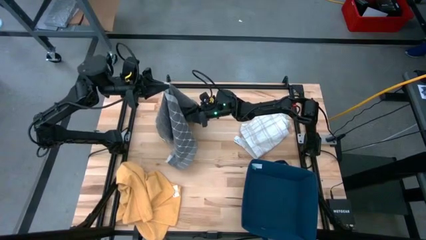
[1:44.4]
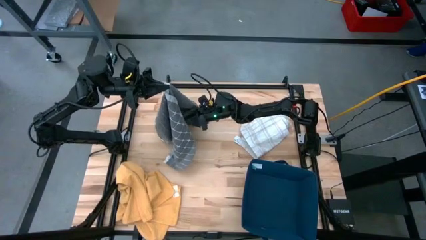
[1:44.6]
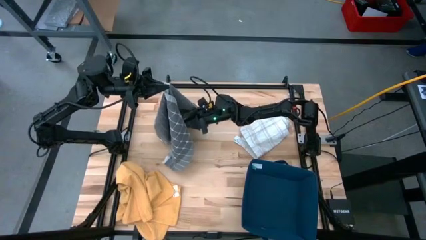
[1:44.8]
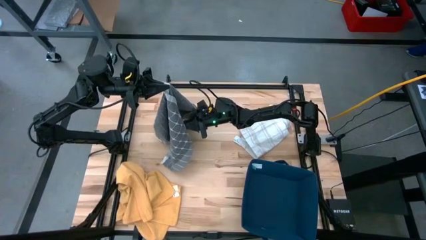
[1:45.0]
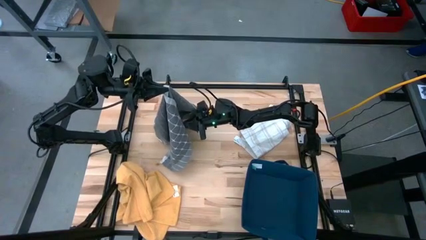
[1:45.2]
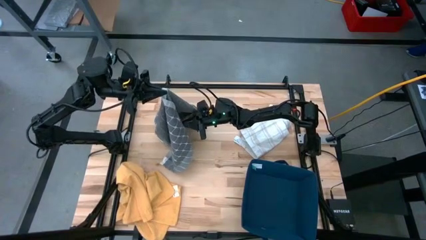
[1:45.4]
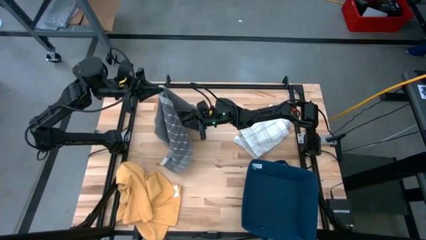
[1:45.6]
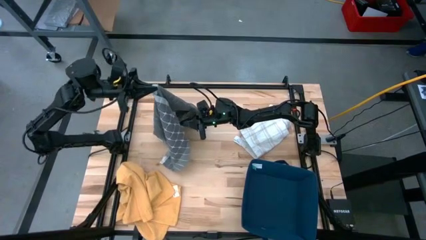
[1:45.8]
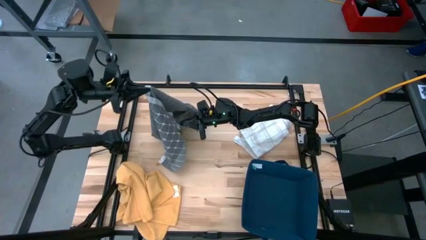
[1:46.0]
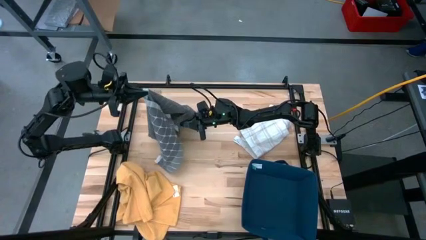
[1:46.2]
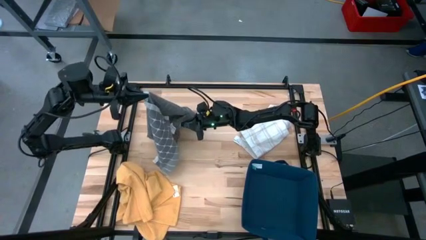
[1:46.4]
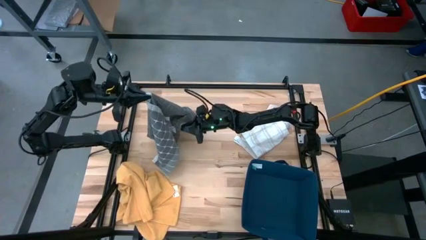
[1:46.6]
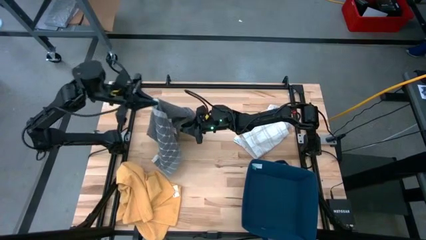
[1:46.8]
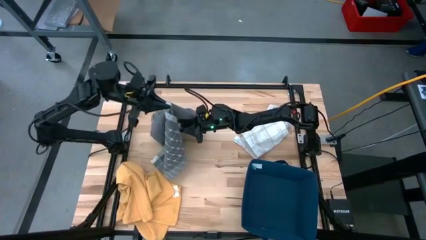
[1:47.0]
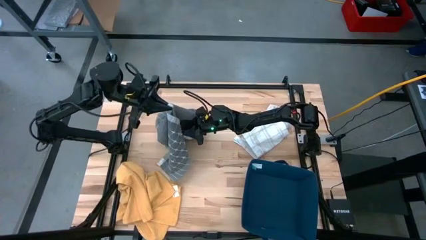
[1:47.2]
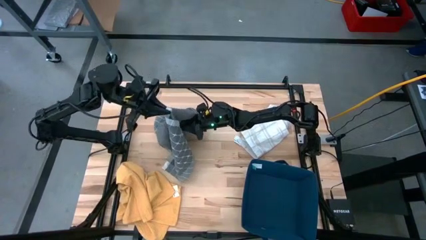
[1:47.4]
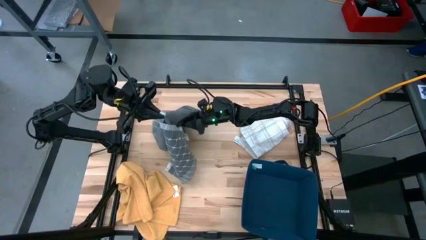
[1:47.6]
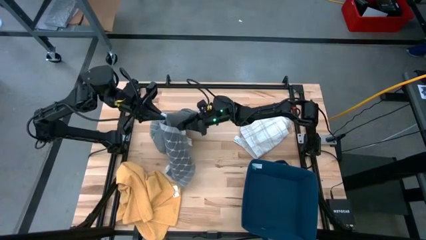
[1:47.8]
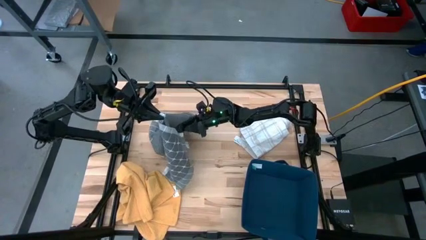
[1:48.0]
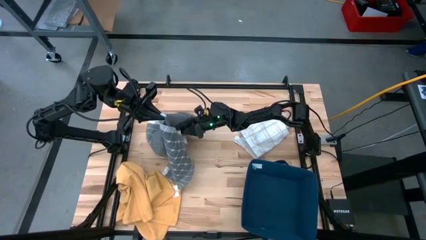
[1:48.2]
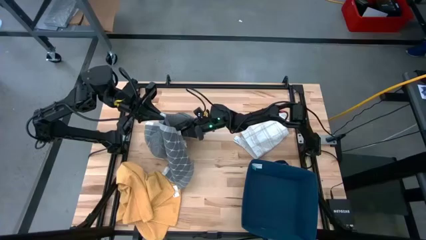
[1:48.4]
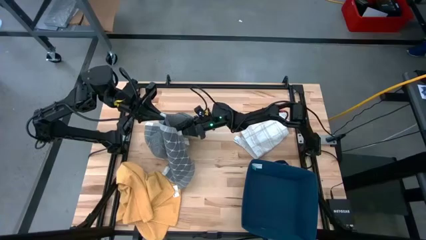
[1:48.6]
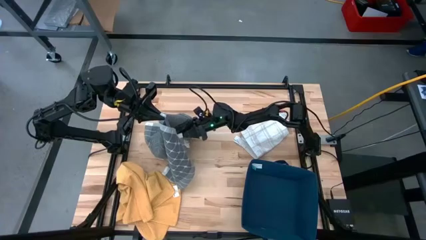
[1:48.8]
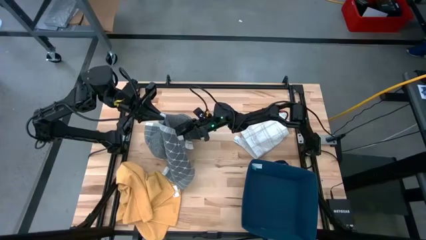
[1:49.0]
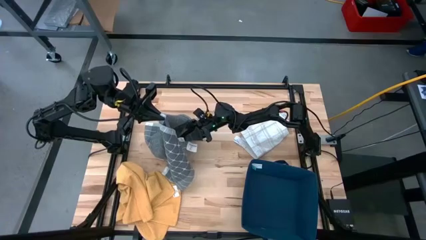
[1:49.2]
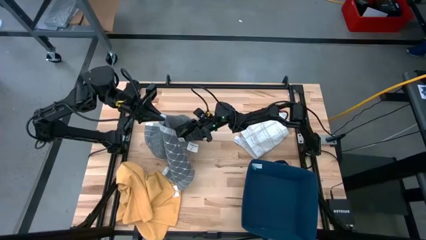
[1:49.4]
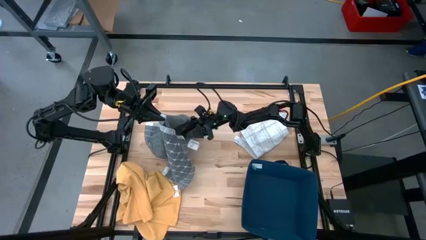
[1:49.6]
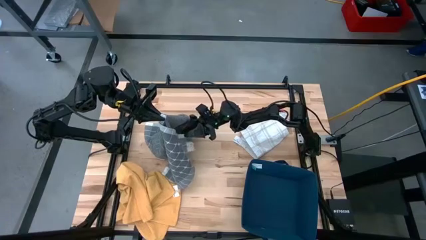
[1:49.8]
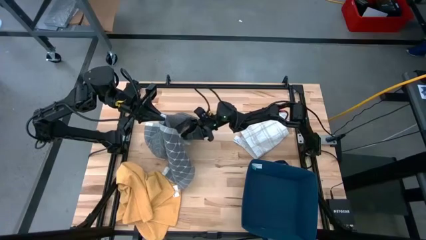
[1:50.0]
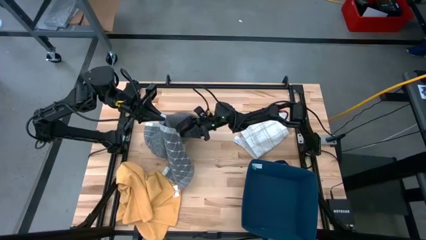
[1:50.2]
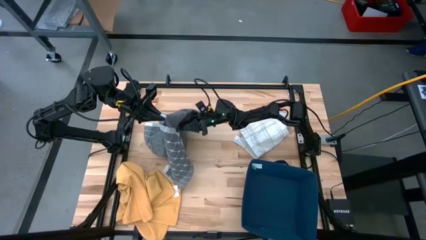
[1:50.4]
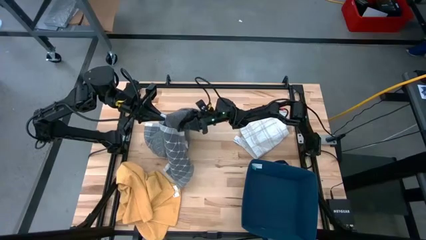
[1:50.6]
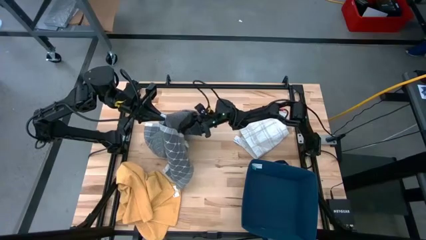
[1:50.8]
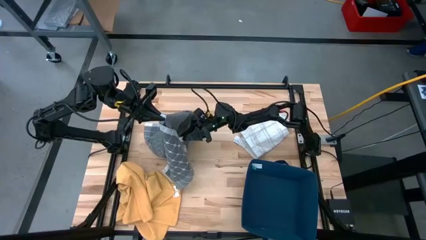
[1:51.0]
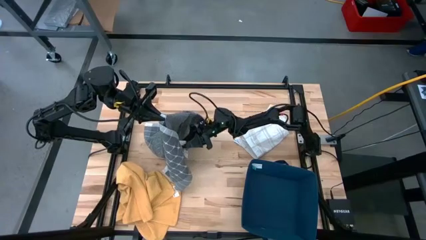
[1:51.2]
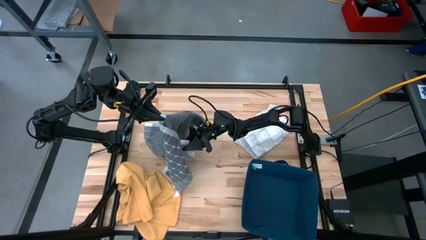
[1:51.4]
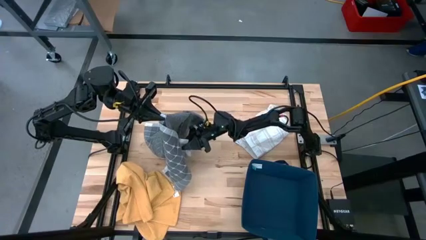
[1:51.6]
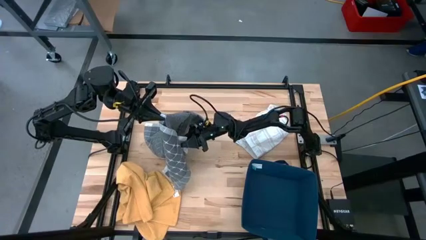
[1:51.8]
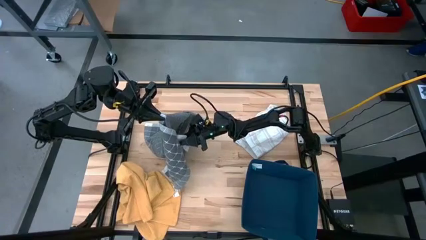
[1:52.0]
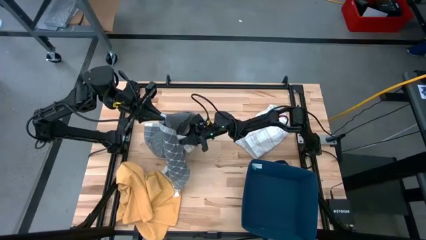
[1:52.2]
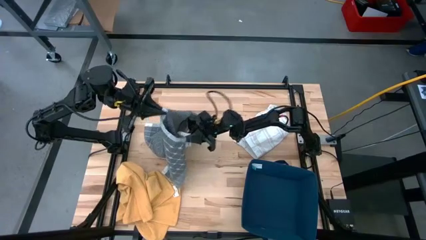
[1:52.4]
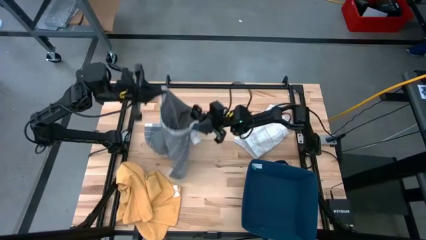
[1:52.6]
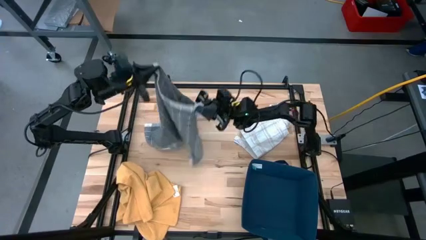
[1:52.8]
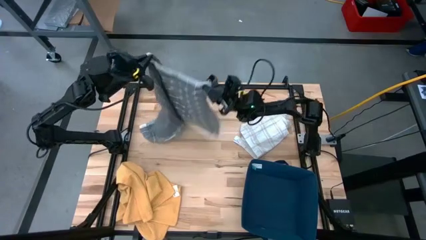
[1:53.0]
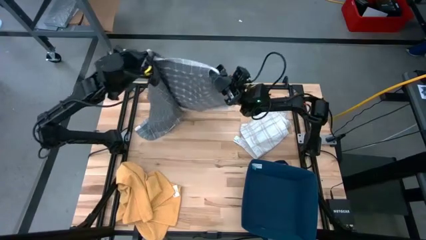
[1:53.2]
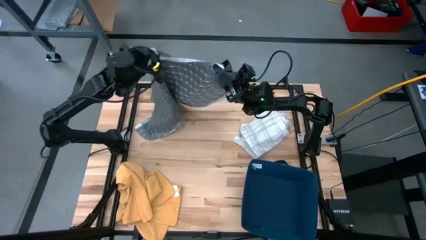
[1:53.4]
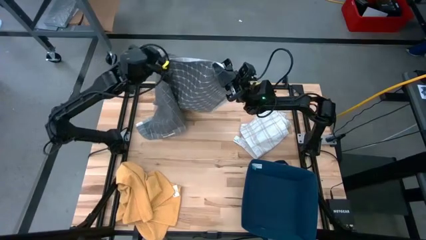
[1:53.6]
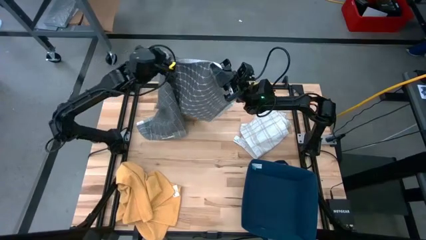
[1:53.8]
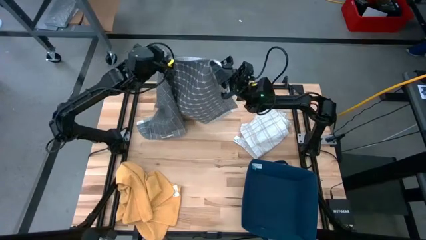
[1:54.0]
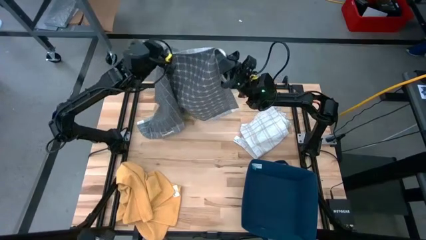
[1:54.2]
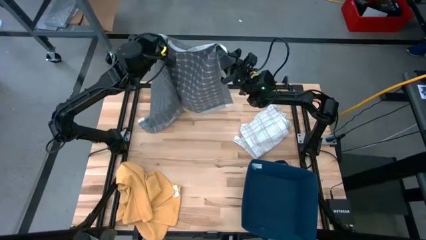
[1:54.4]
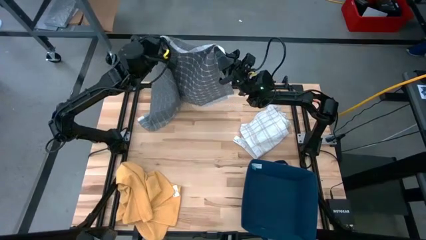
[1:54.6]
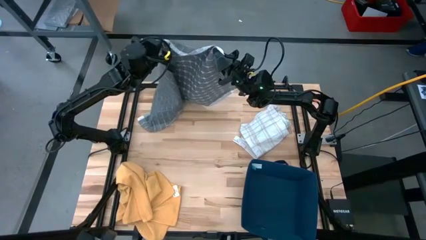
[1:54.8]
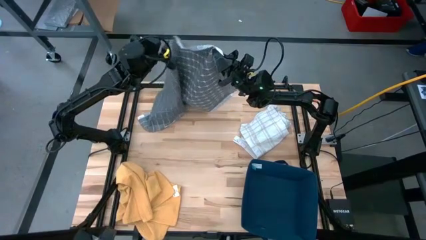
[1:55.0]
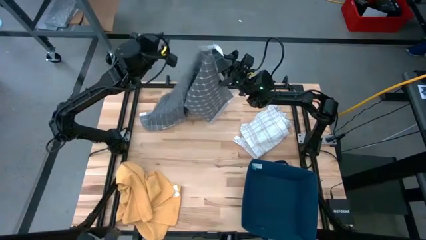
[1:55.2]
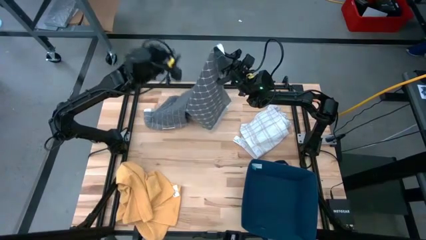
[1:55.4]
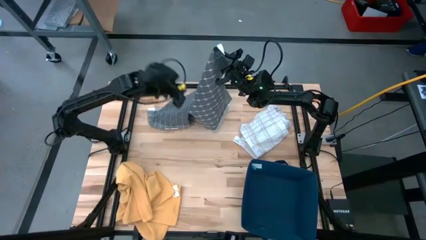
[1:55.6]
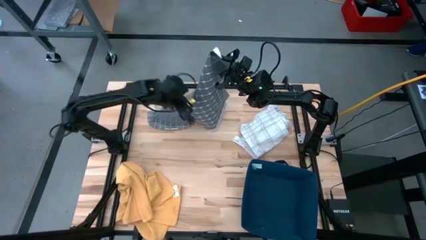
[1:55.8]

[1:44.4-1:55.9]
Task: Fold towel
Fold the gray kitchen towel
